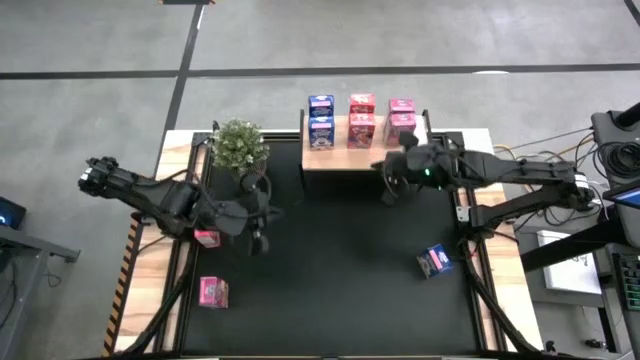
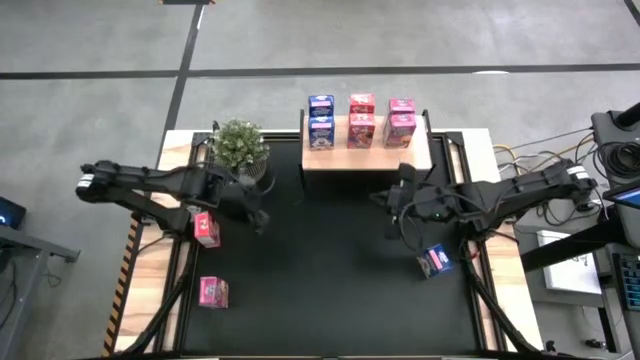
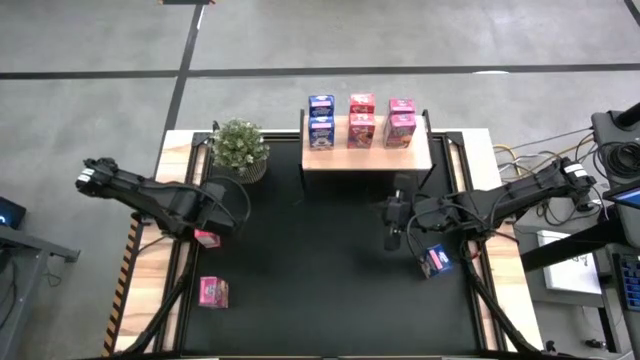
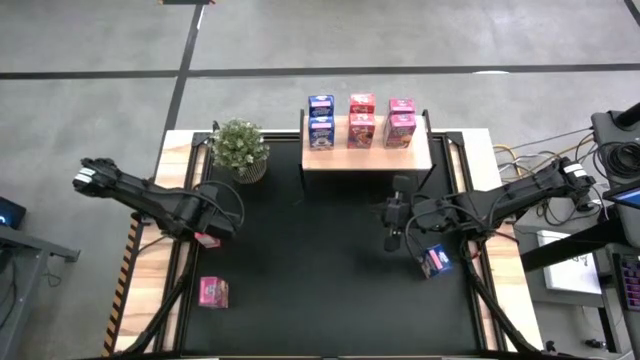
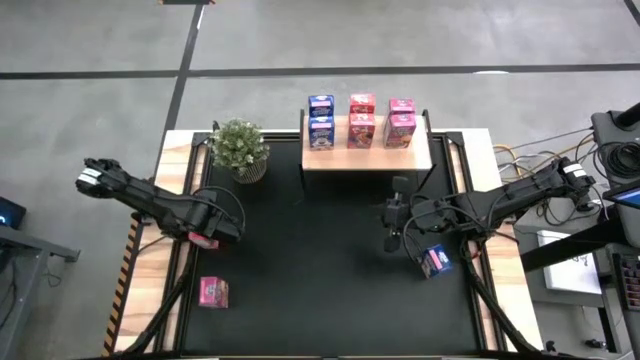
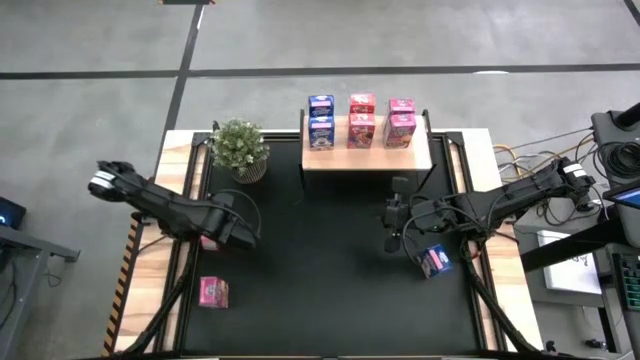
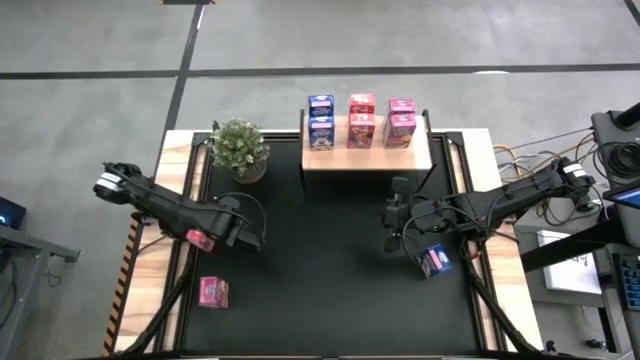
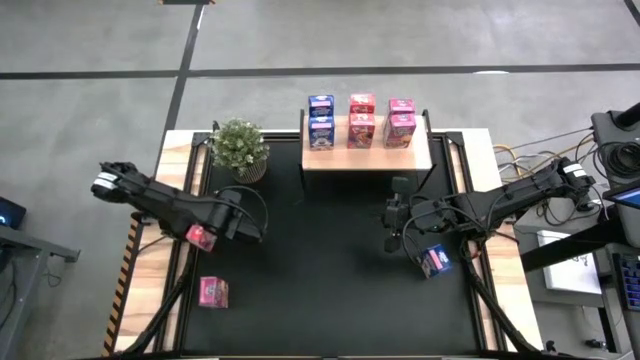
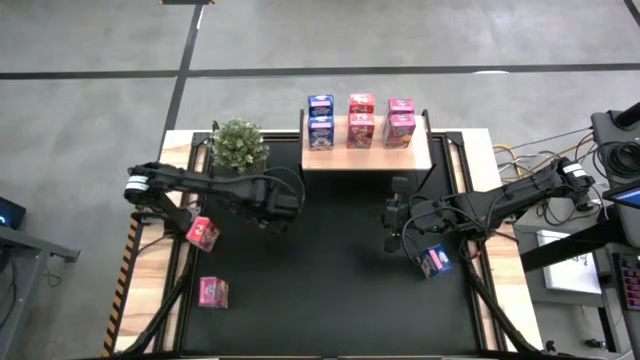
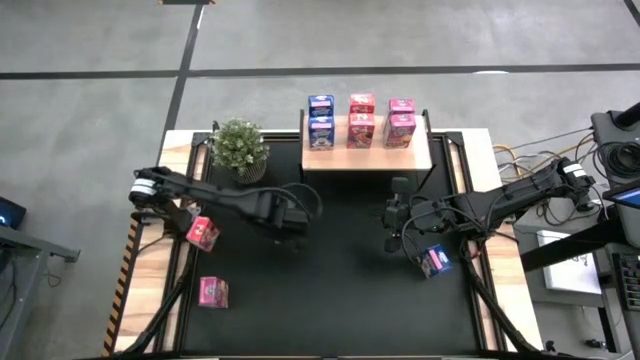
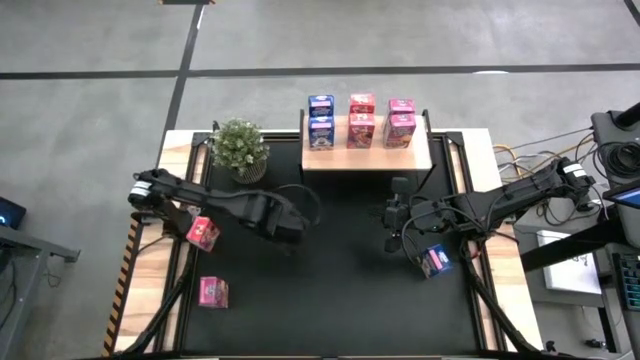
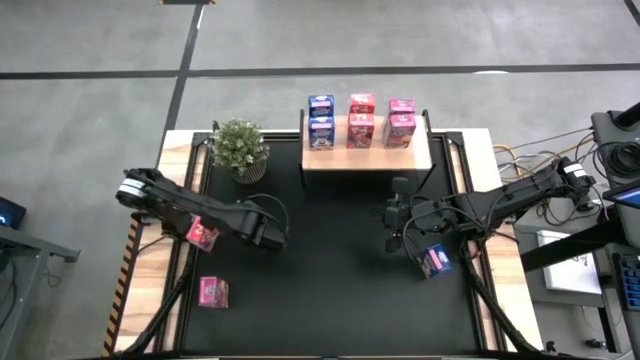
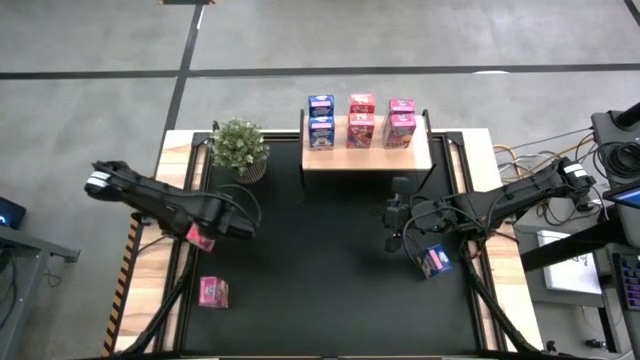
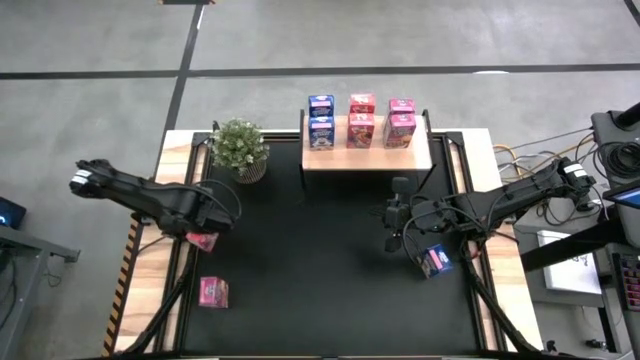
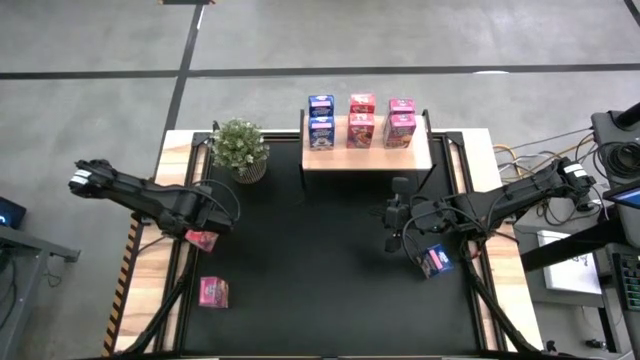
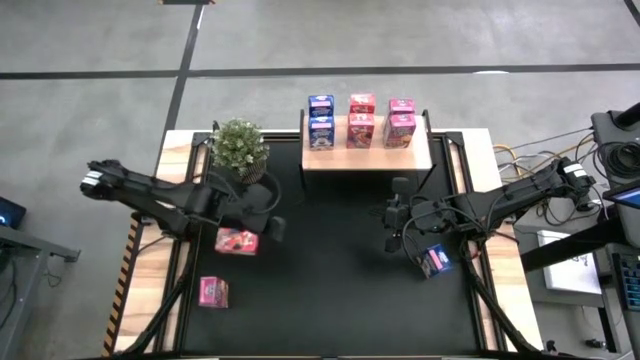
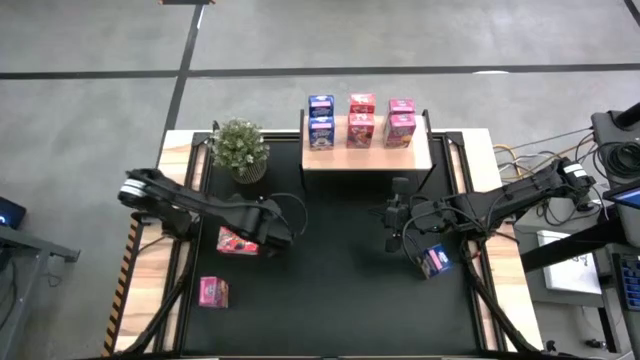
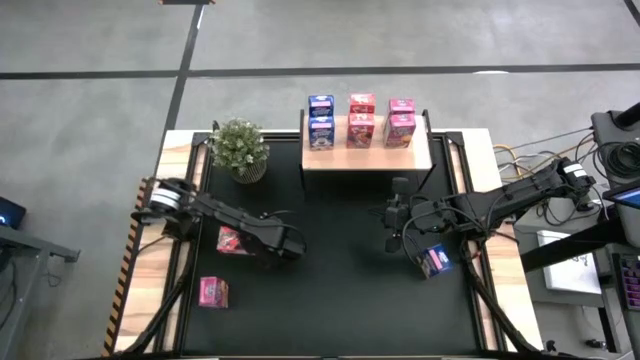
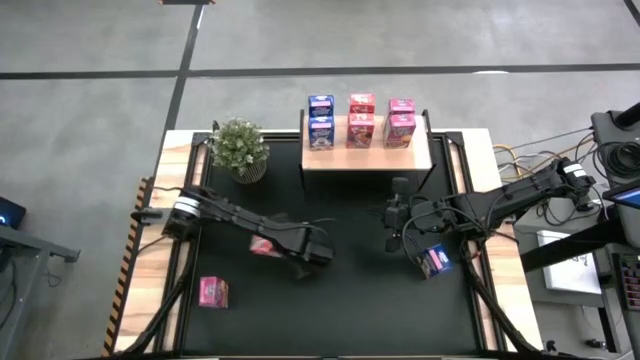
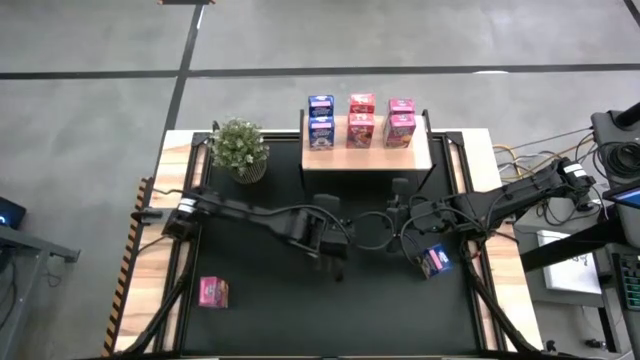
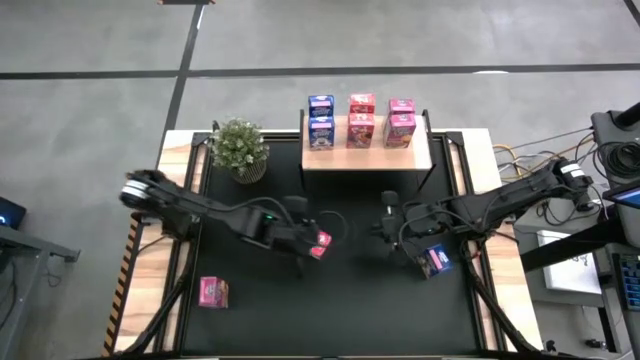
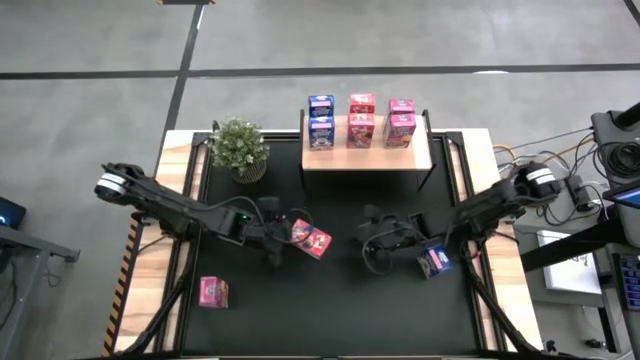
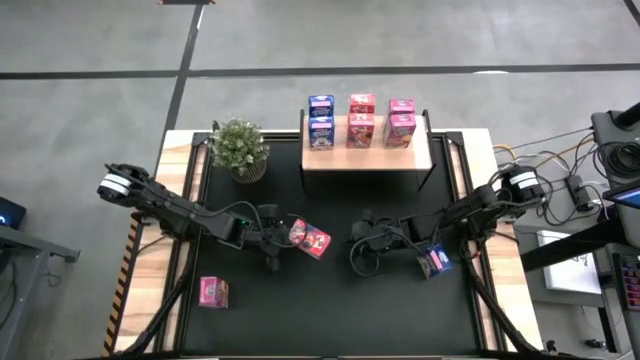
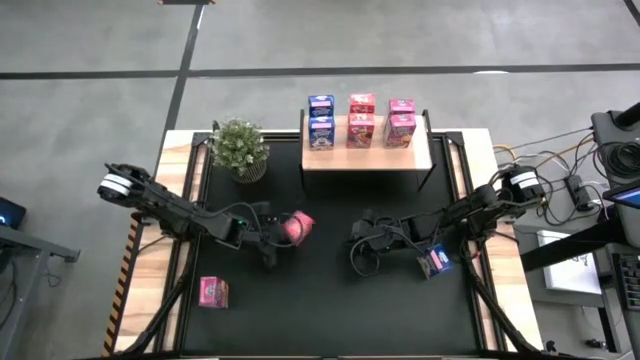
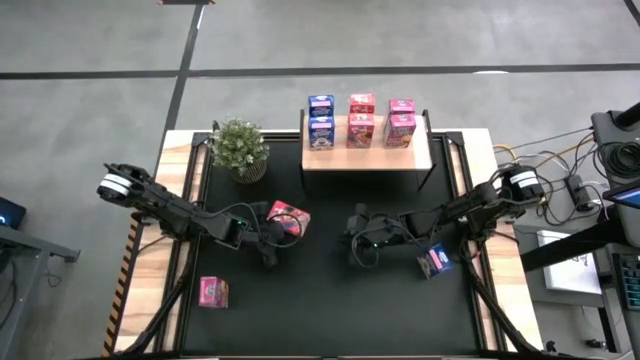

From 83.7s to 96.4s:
Task: Stack cereal on shelf
Put the red cereal box on the shelf and align it with the other red cereal box on the shelf

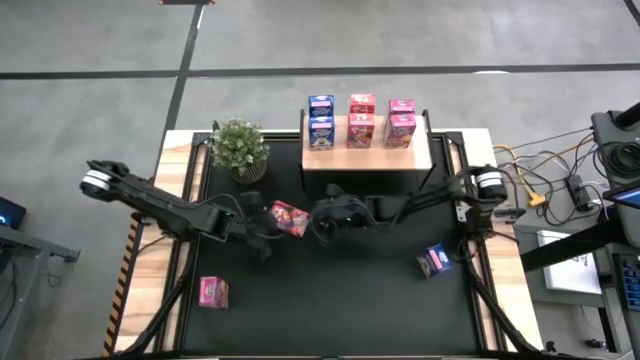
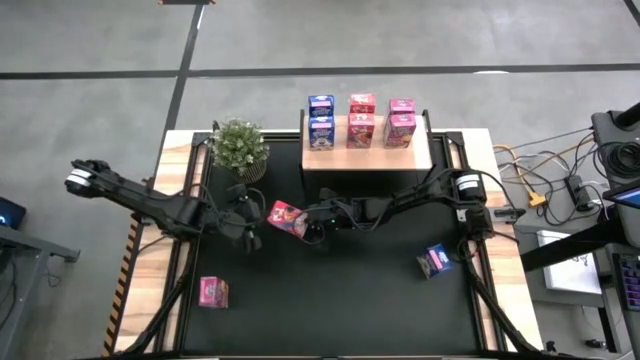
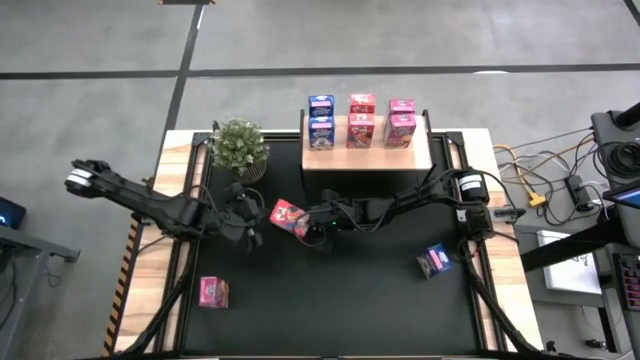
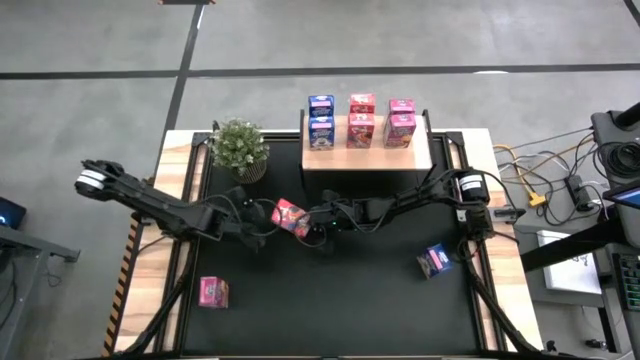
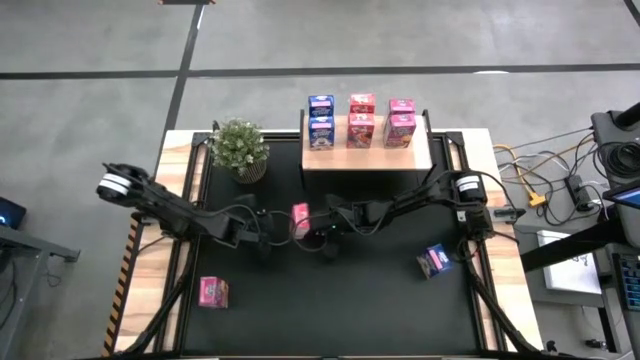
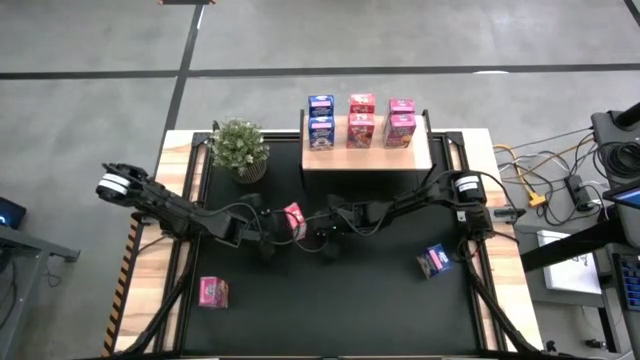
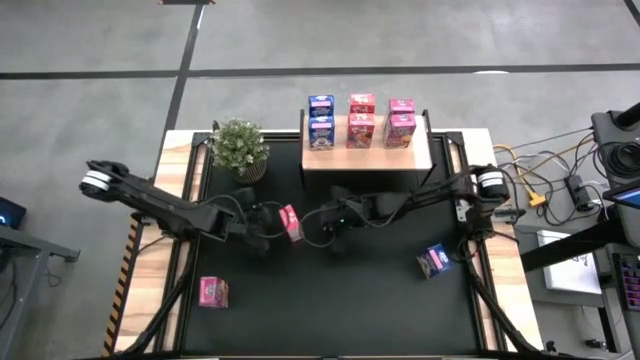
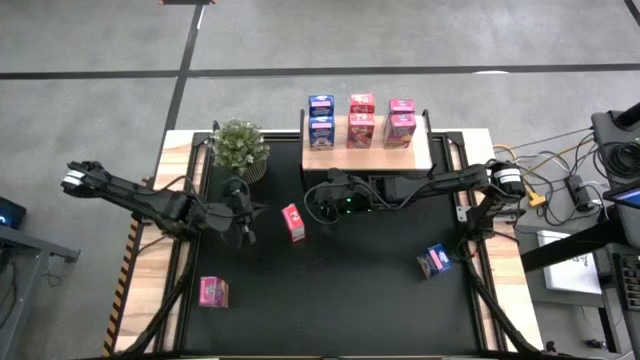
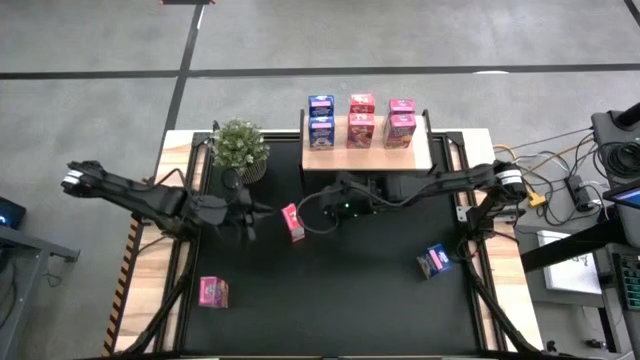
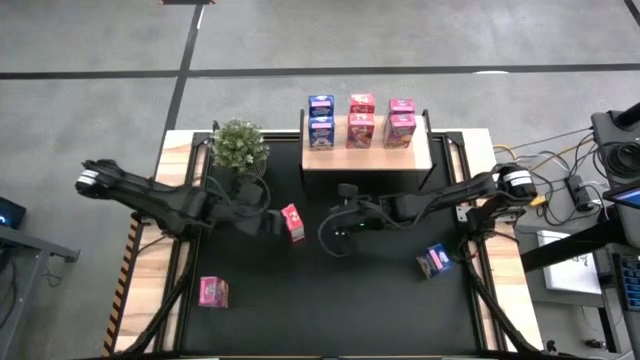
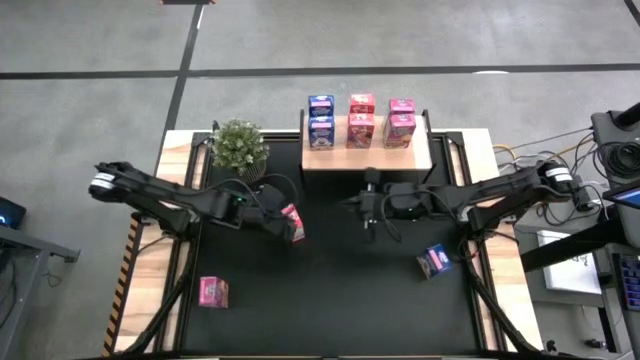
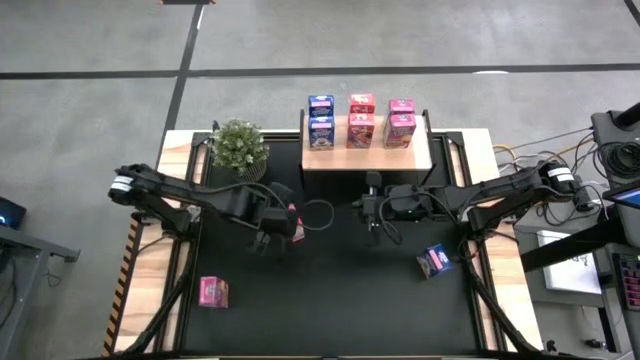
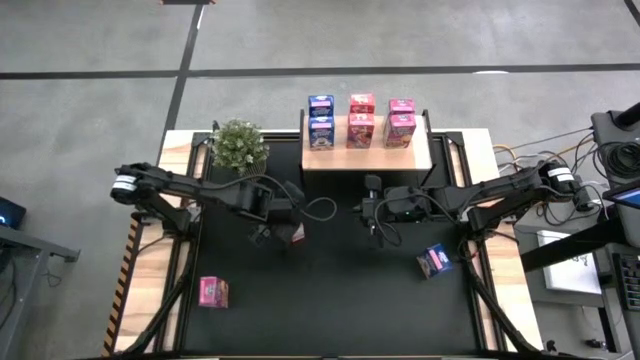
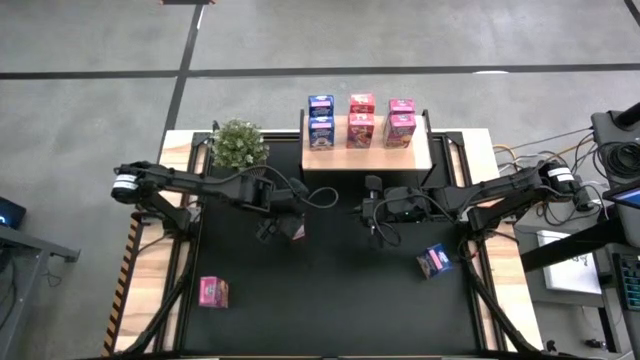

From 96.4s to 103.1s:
Put the red cereal box on the shelf and align it with the other red cereal box on the shelf

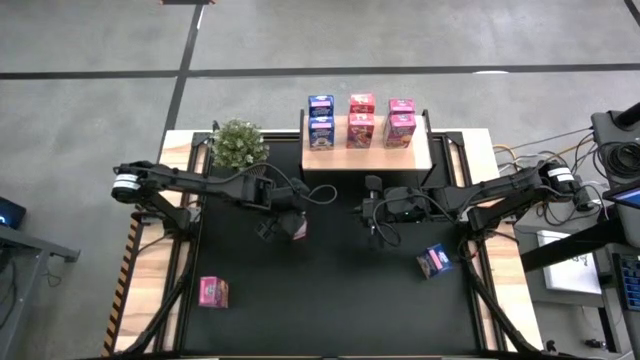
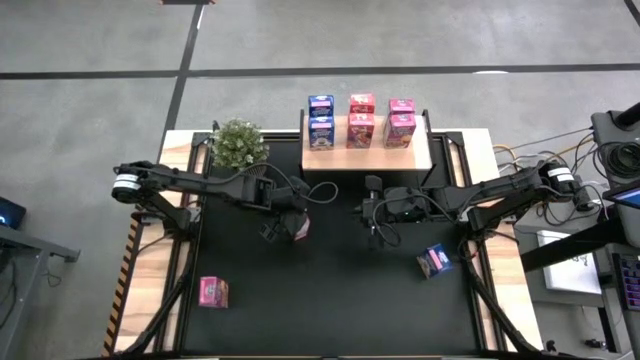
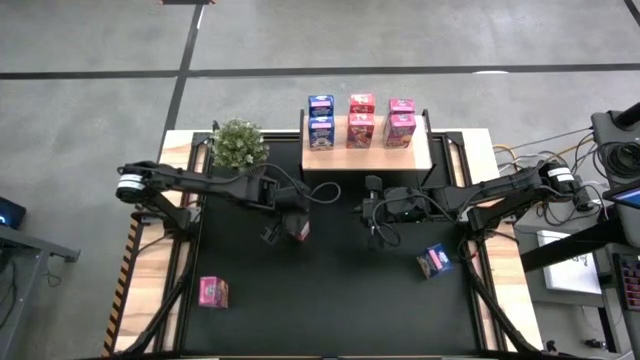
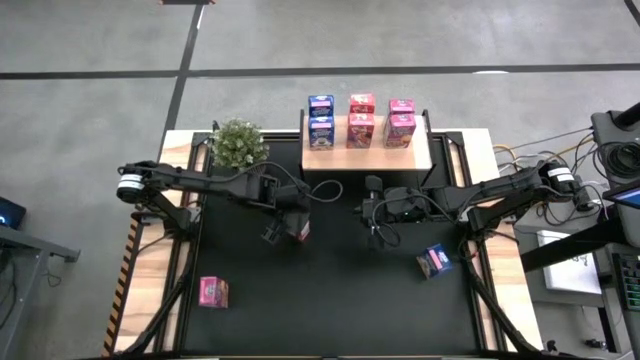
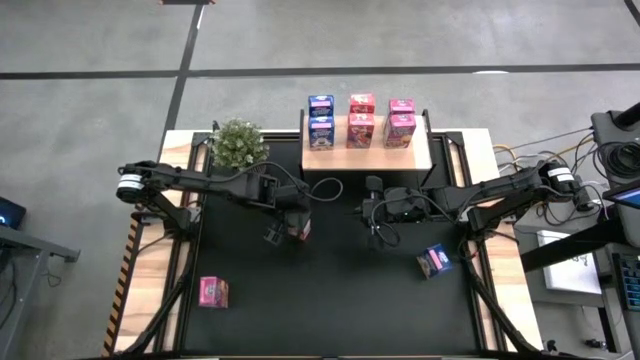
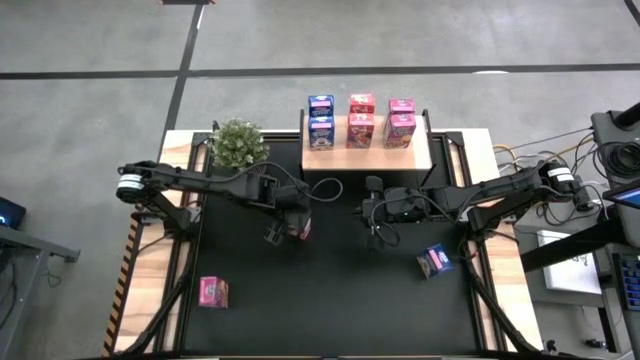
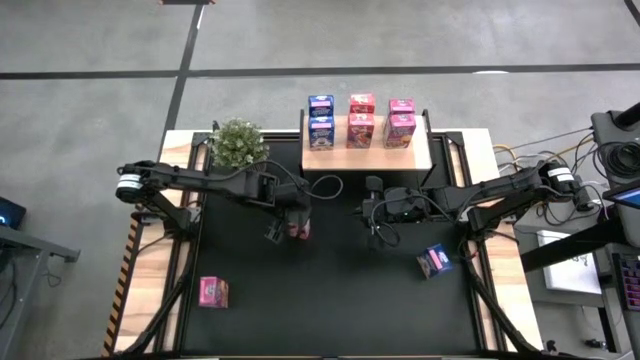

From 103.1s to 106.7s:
Put the red cereal box on the shelf and align it with the other red cereal box on the shelf
